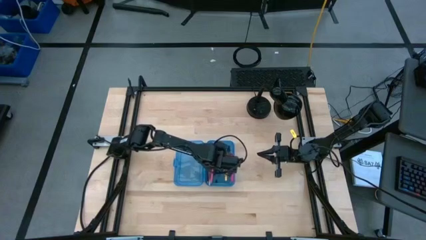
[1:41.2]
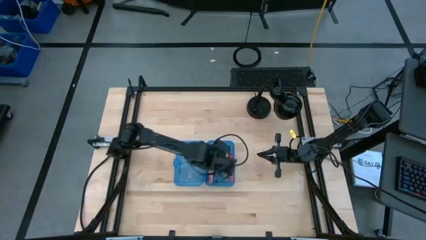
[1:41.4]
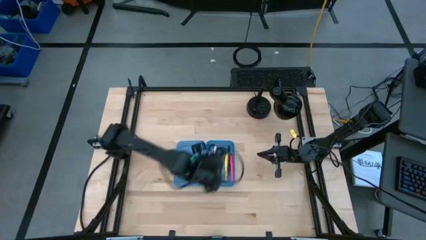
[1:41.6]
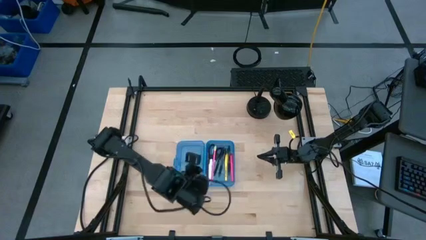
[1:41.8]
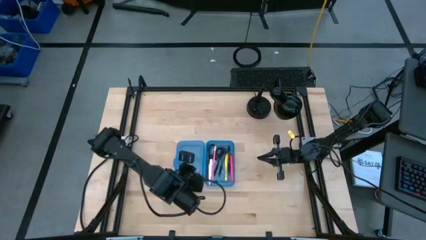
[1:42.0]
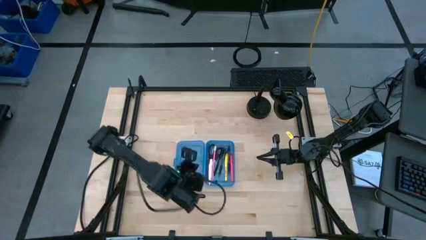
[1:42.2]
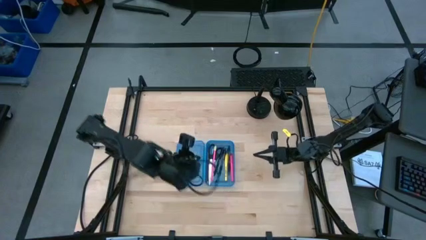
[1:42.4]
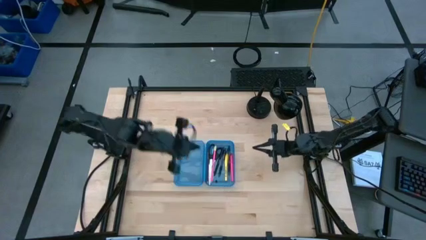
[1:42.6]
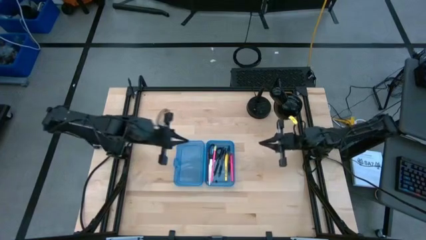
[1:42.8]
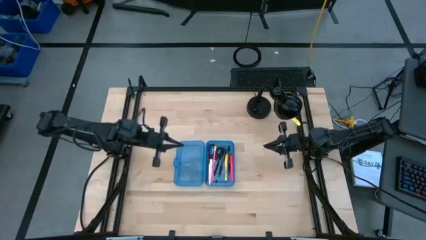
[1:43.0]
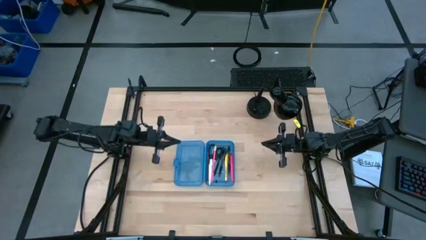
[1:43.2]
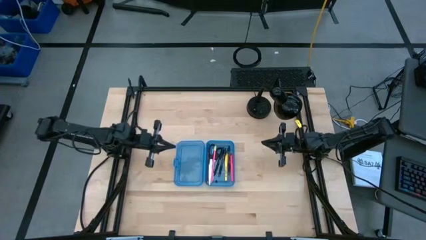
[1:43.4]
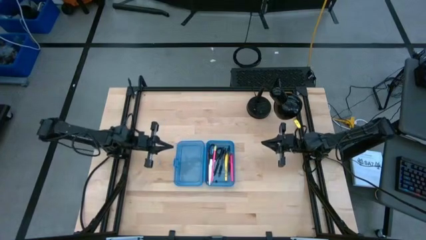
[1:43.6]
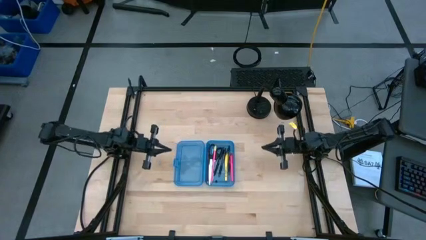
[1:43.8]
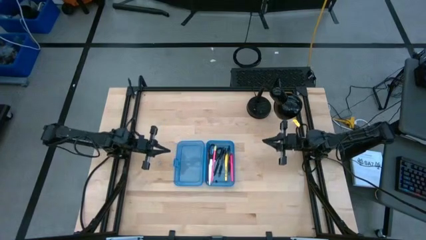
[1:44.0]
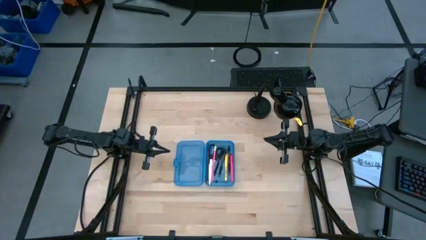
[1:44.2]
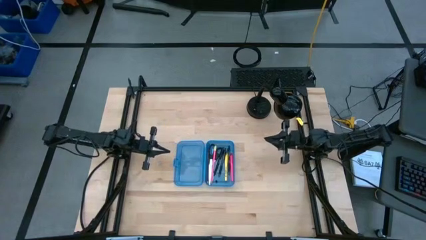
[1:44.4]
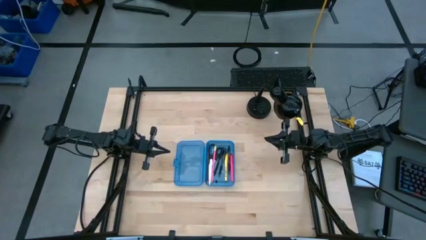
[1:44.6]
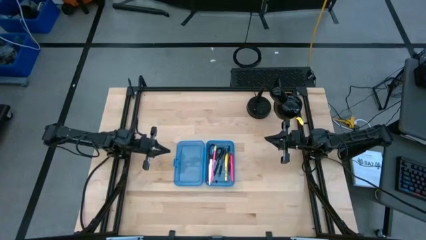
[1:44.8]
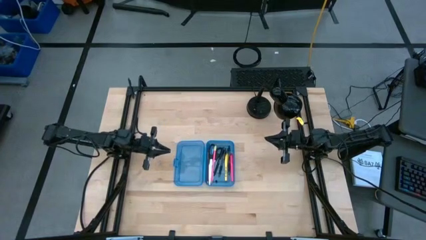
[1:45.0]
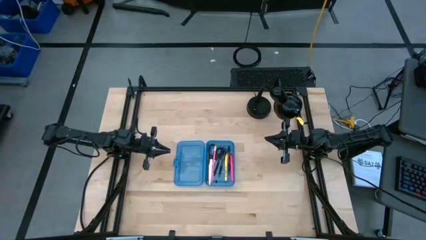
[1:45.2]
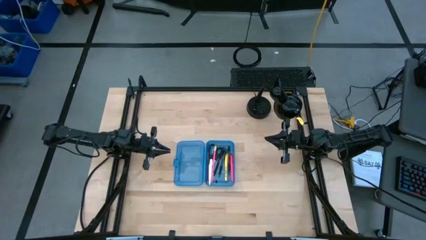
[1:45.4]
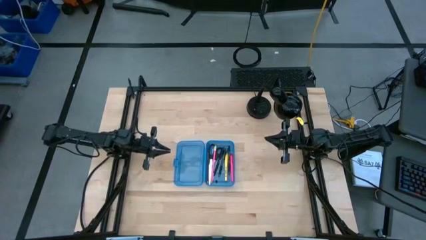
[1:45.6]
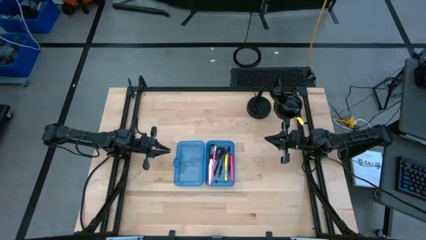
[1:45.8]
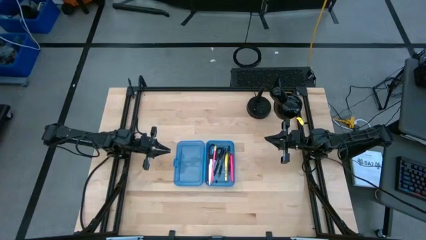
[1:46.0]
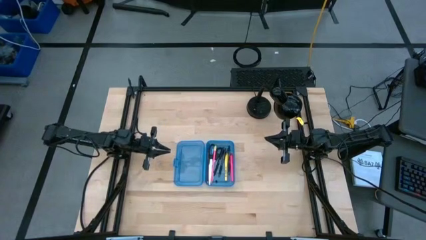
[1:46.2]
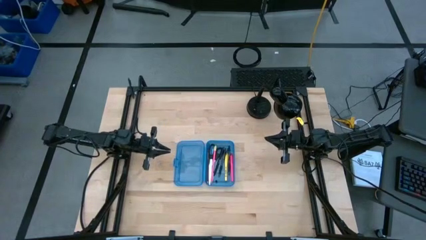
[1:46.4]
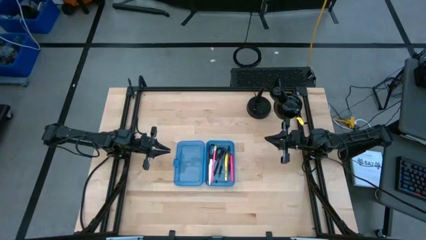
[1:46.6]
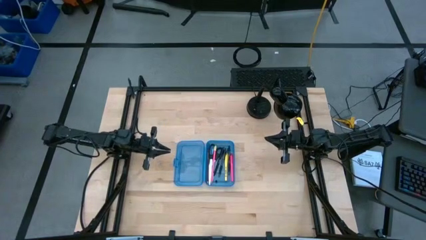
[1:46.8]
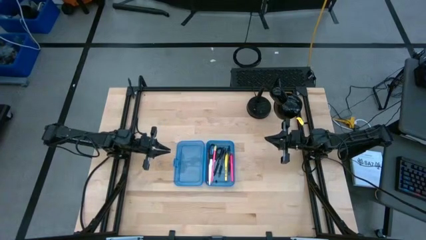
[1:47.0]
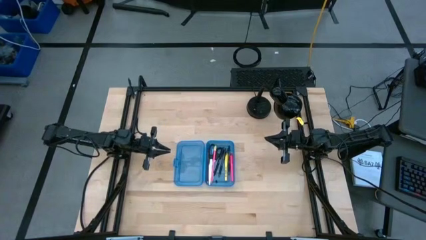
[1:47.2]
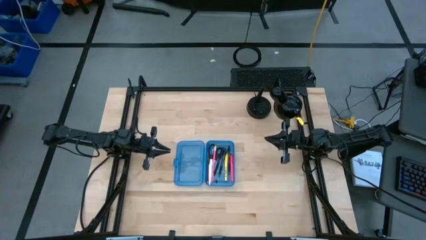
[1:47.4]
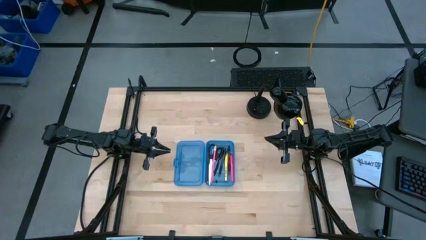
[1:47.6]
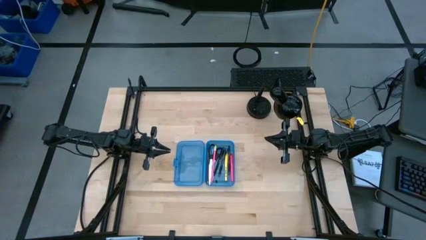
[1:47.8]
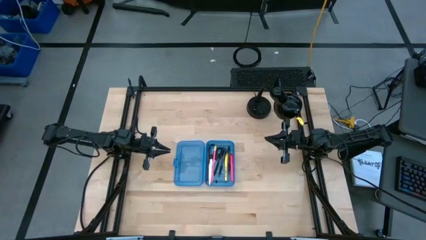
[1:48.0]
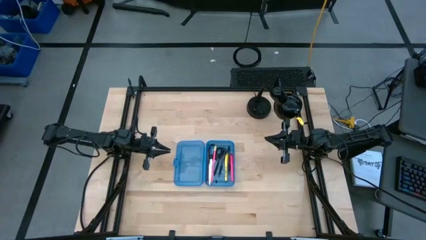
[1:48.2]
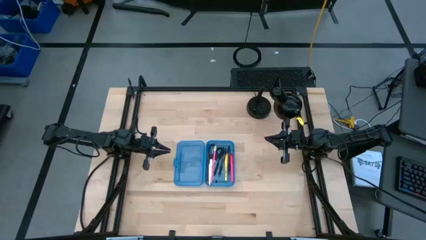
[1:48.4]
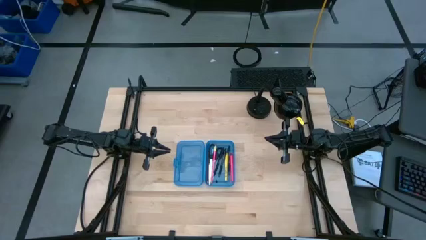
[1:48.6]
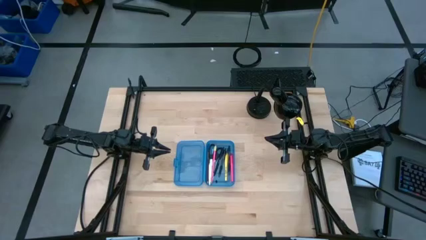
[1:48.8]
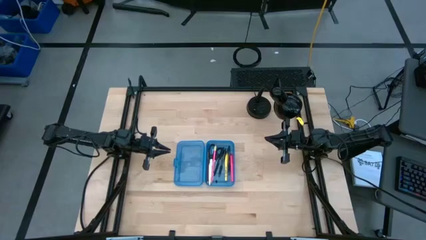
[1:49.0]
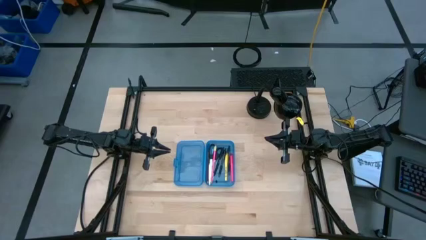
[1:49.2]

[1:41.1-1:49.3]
Task: Pick & place school supplies into a supply box
Return to Home Position

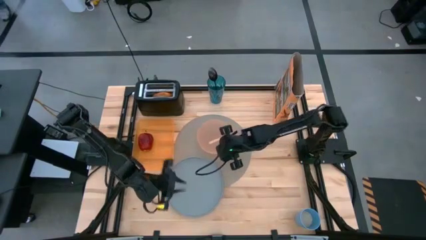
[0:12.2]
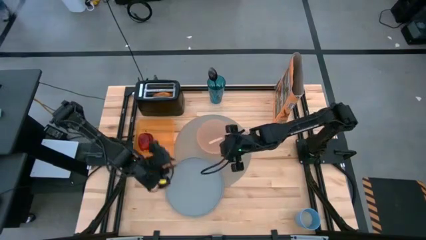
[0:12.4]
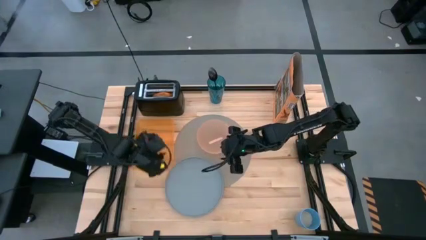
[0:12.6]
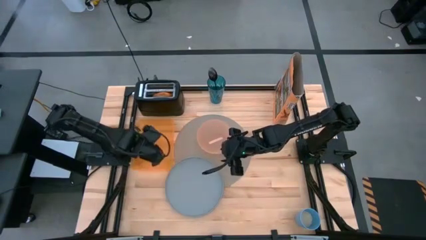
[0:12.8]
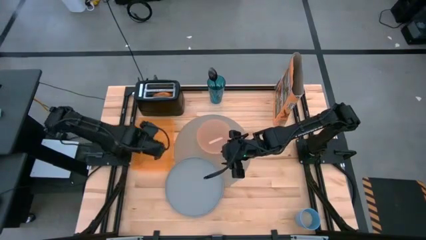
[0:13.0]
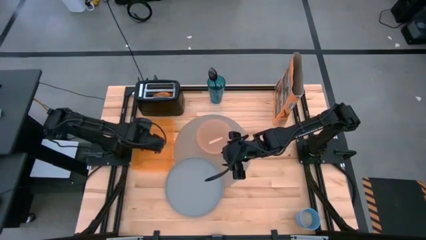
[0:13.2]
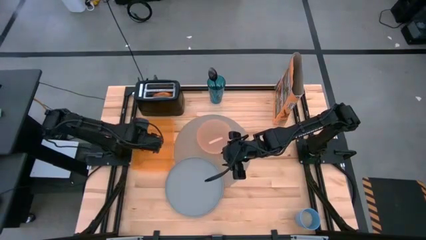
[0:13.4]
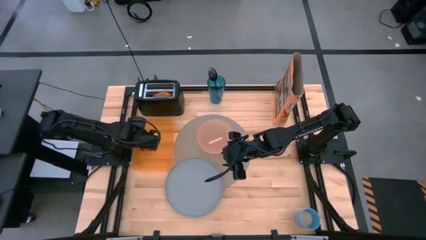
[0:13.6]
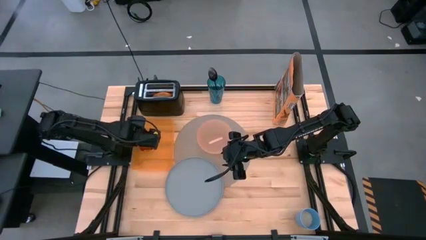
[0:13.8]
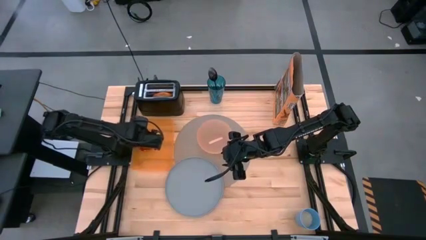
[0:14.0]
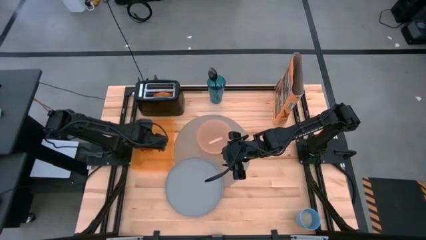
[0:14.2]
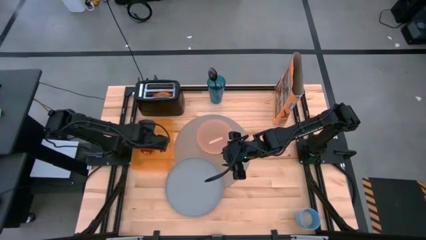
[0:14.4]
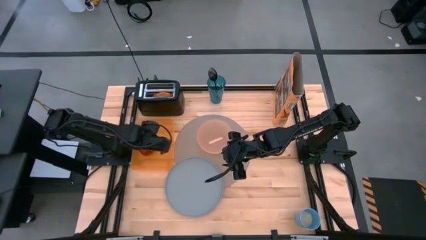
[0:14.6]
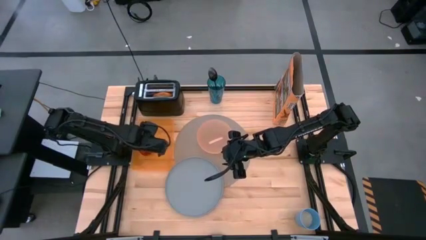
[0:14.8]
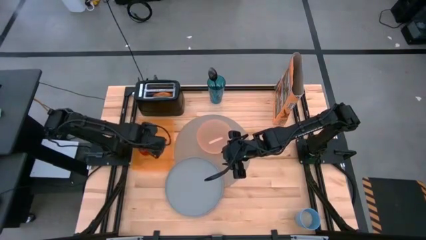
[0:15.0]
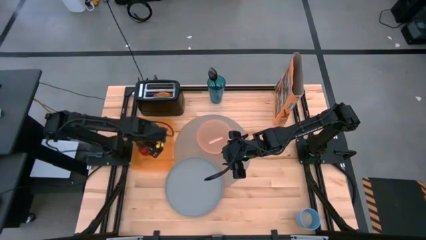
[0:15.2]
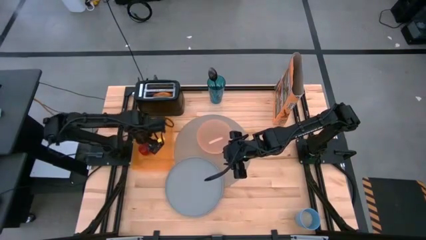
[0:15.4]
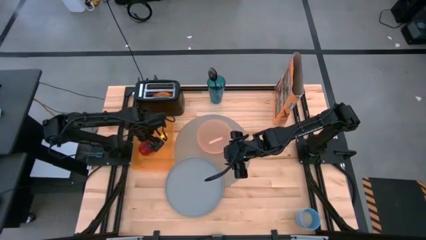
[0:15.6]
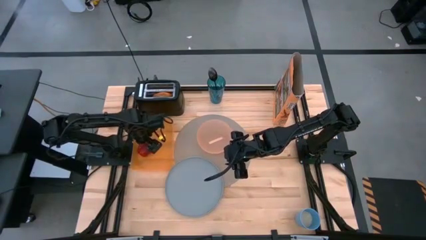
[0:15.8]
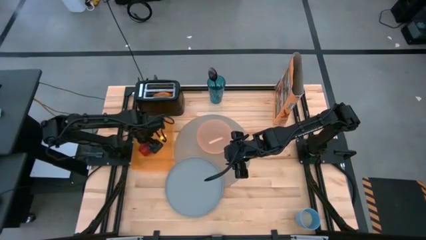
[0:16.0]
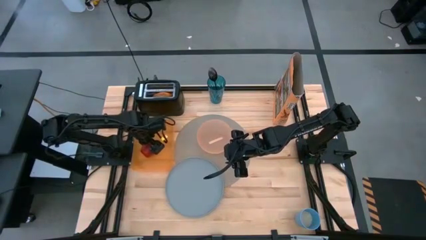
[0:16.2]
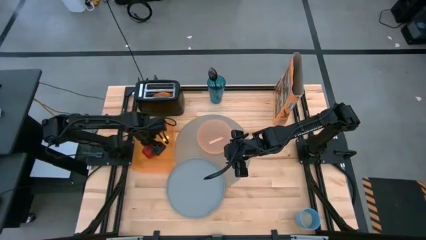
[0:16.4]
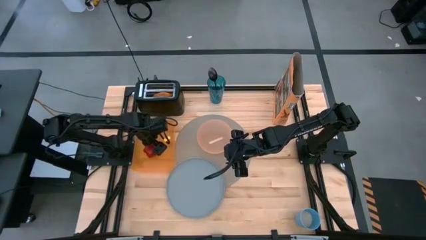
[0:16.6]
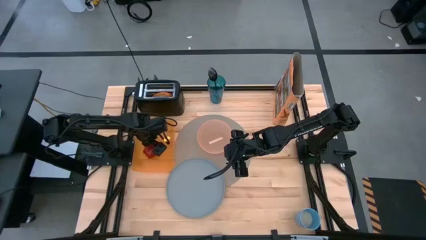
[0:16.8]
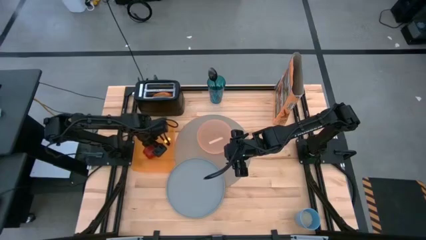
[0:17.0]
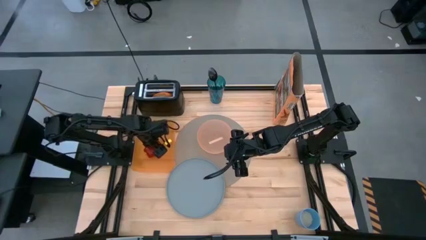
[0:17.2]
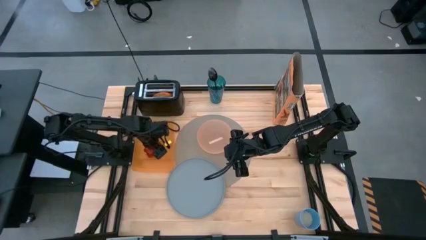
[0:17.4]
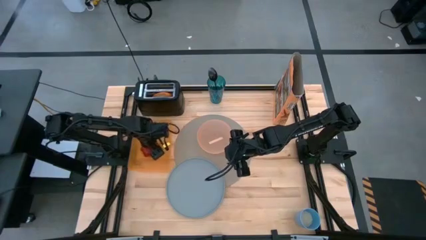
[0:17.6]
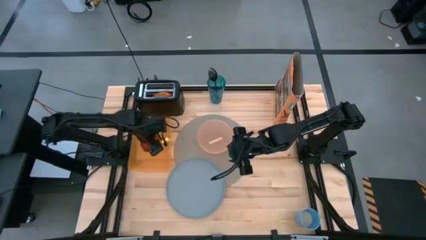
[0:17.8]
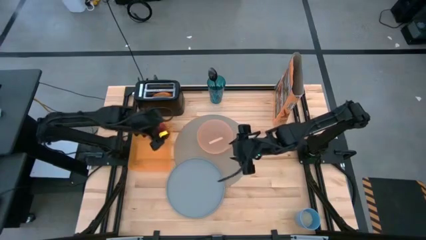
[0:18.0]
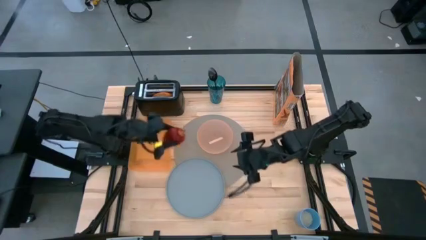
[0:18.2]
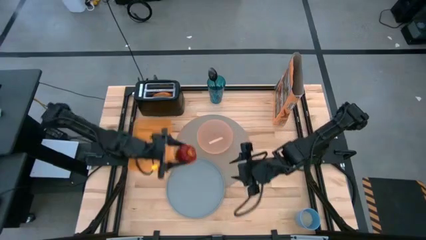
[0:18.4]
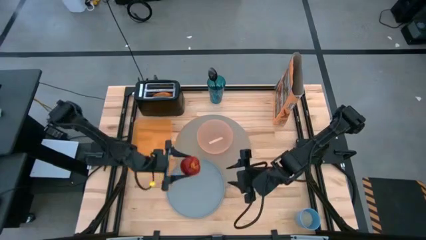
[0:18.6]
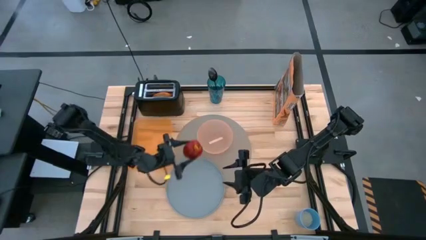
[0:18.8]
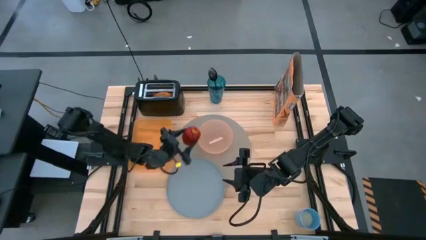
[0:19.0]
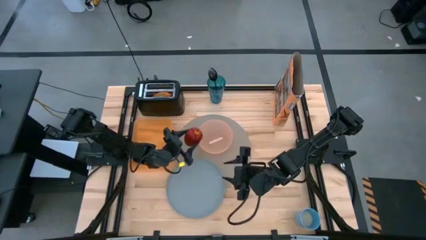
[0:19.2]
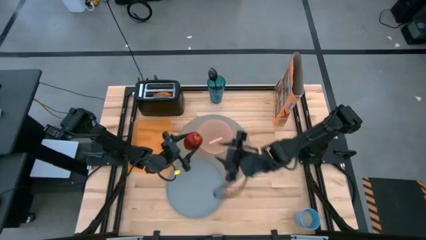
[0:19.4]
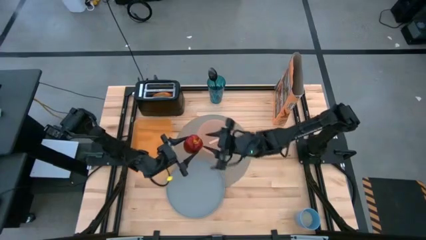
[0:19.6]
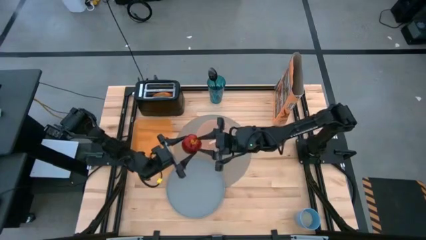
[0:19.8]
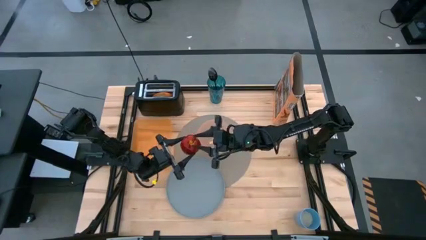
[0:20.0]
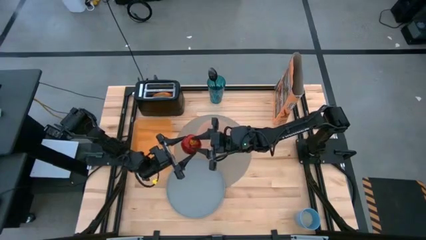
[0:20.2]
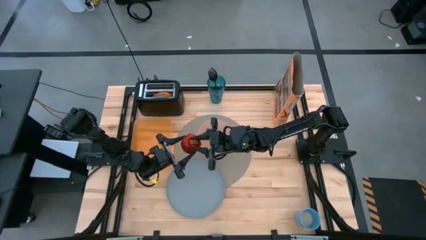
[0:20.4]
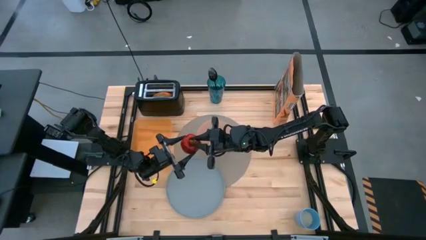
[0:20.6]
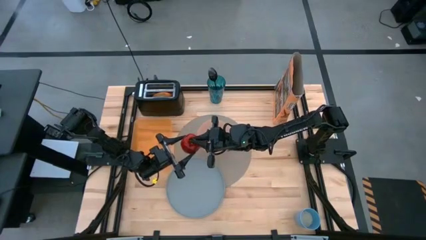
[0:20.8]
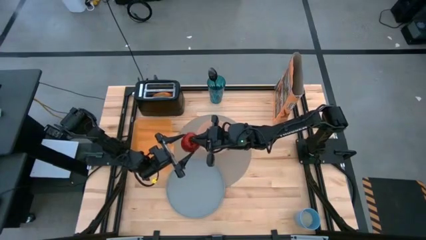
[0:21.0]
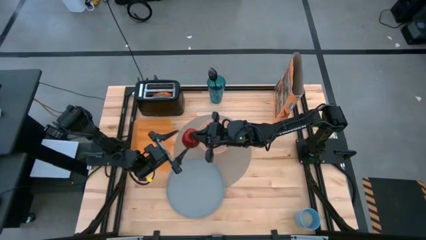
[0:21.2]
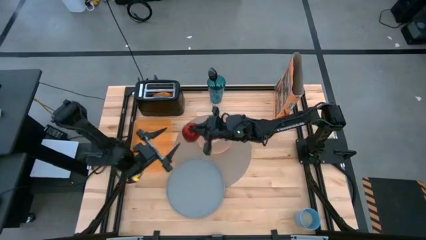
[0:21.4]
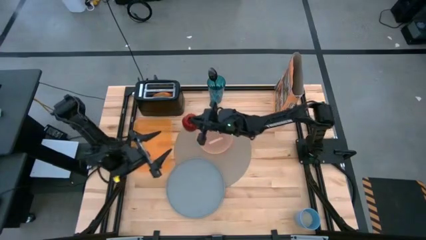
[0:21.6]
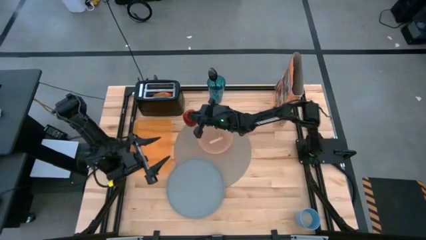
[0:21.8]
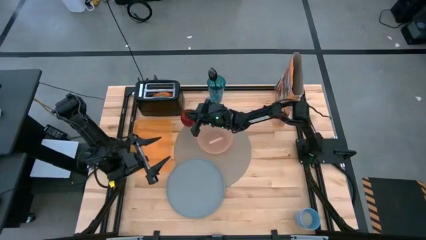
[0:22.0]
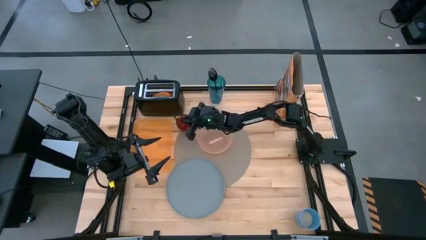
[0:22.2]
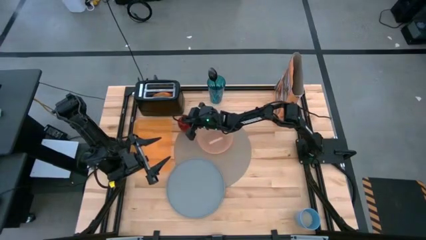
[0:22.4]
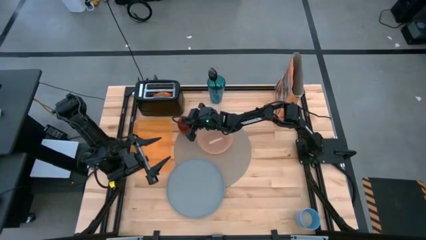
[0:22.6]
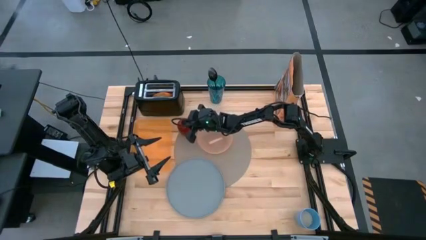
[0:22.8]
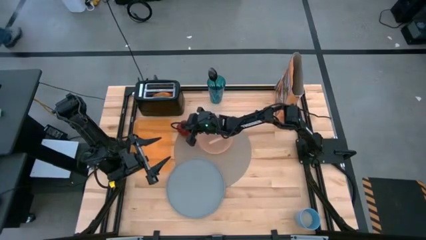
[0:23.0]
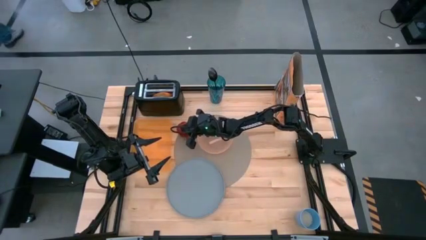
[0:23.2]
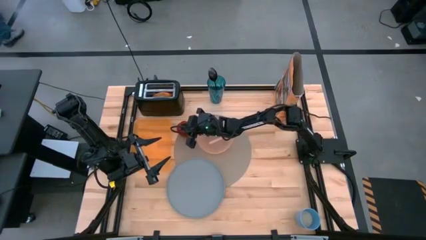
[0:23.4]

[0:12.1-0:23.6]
Task: Arrange a breakfast setting
Put the apple on the gray placemat to the left of the orange bowl
